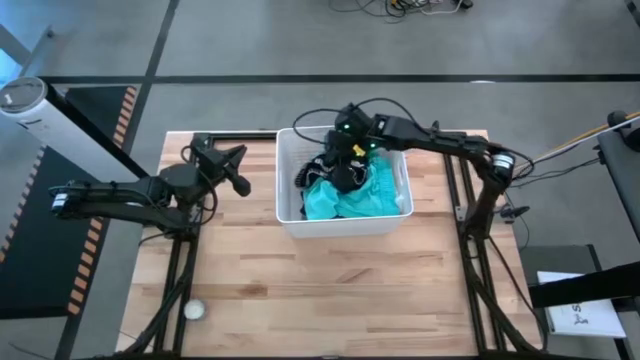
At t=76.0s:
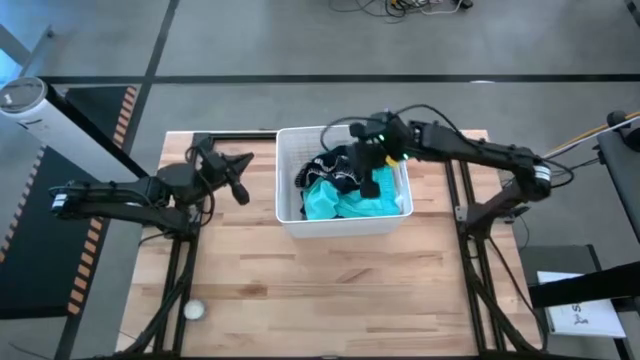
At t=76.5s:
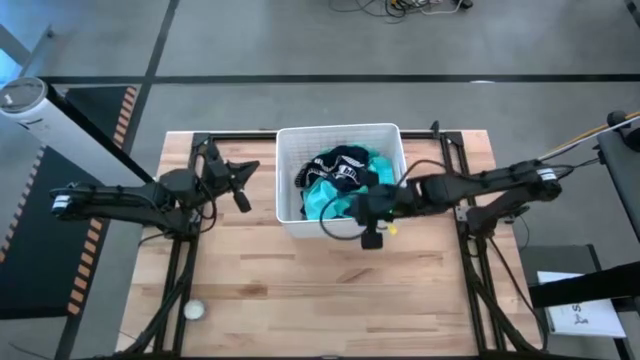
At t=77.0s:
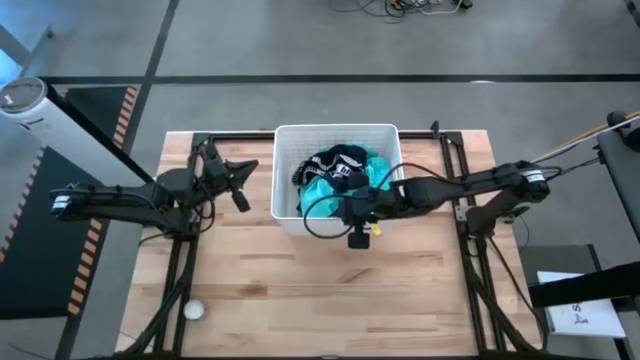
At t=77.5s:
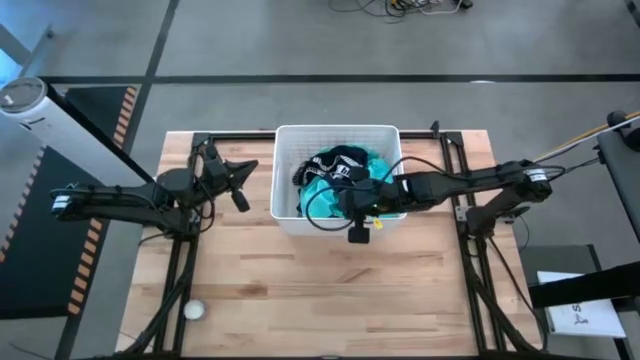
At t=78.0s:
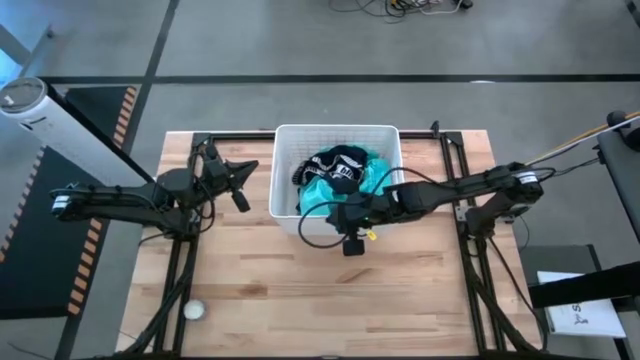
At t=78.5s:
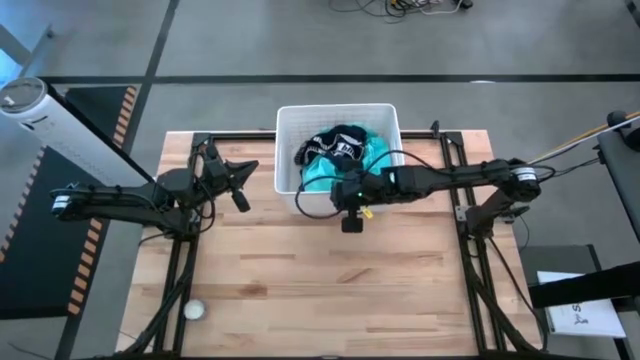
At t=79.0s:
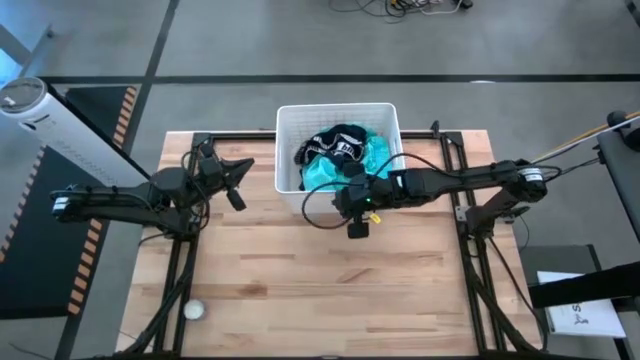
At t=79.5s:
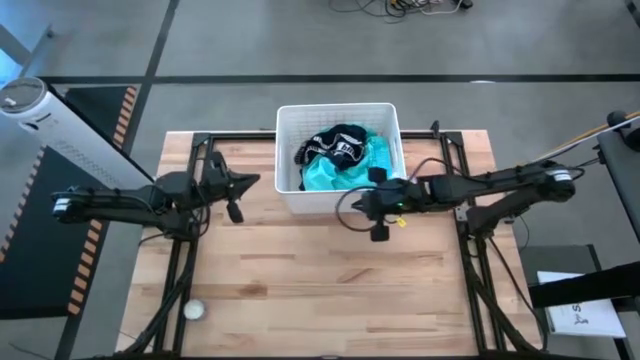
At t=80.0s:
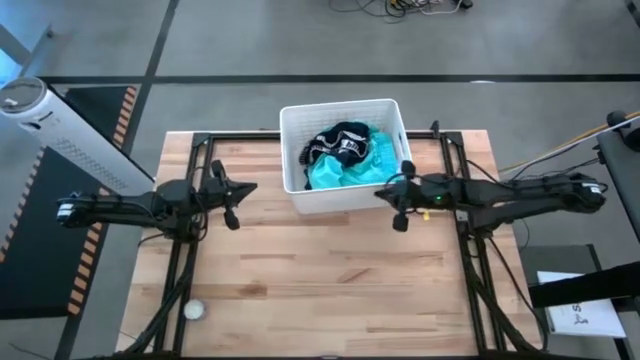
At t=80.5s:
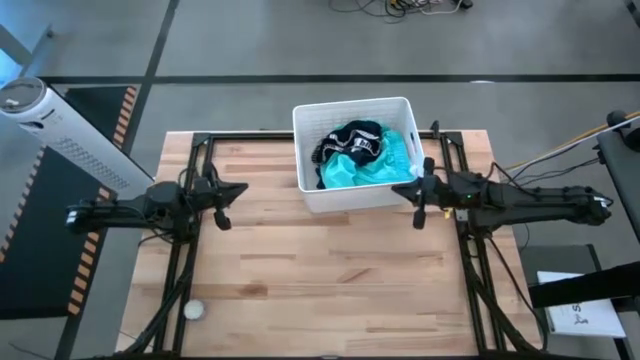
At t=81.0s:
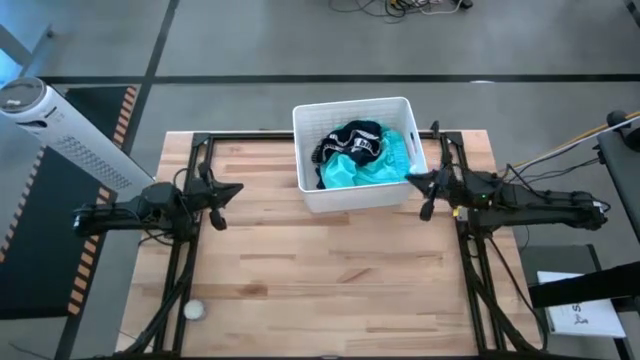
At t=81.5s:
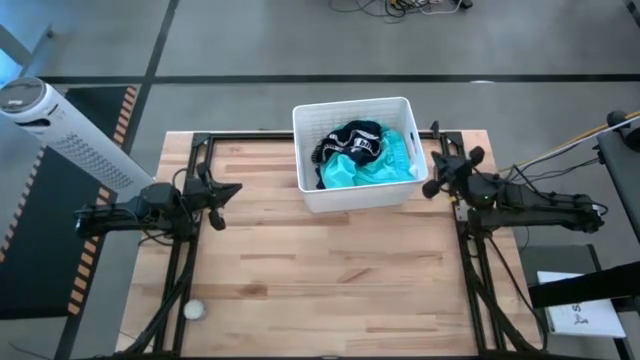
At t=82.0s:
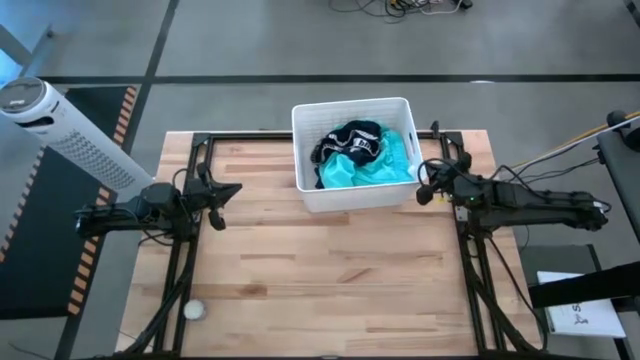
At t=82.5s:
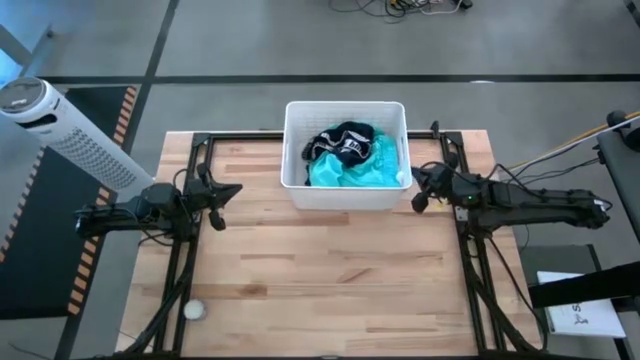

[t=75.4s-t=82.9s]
Task: Sort clothes
Move the white laundry bin to the top center of the table

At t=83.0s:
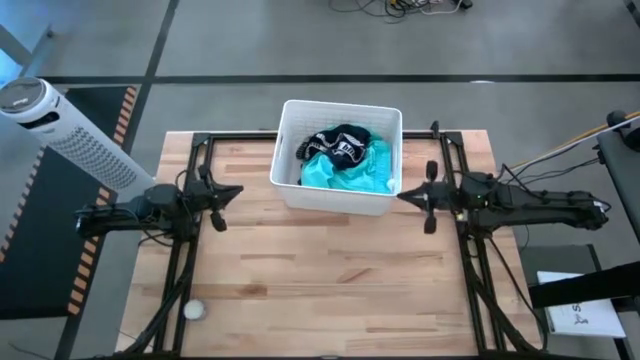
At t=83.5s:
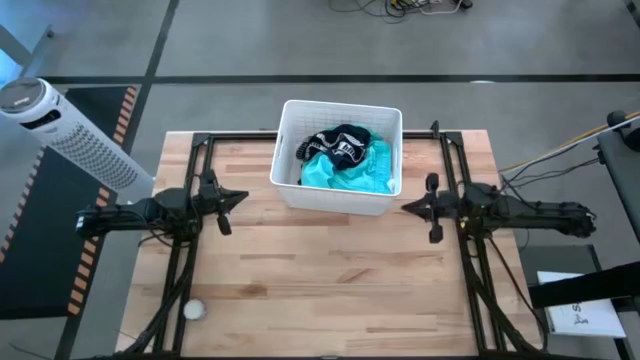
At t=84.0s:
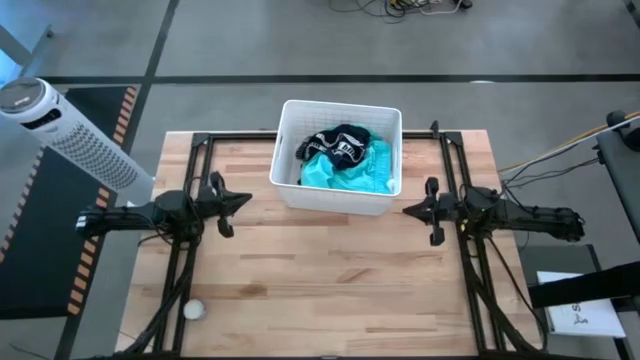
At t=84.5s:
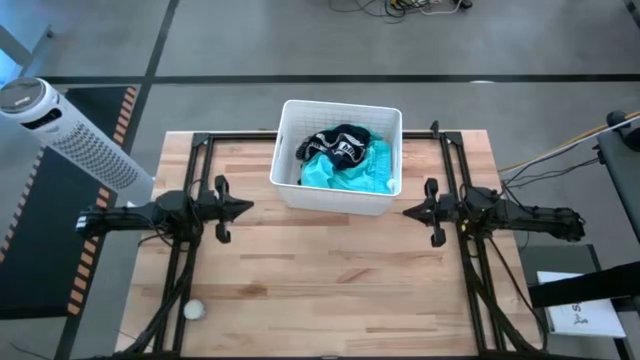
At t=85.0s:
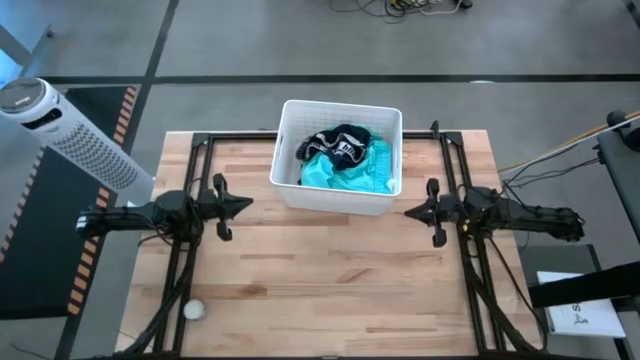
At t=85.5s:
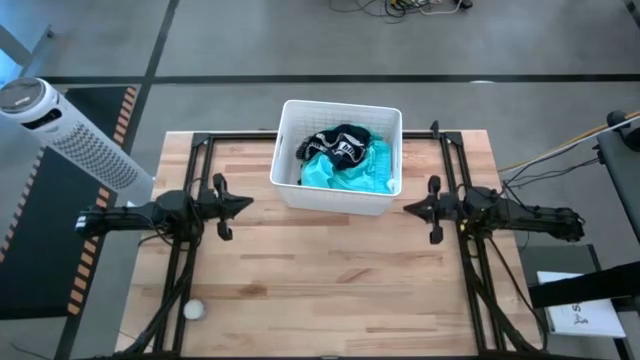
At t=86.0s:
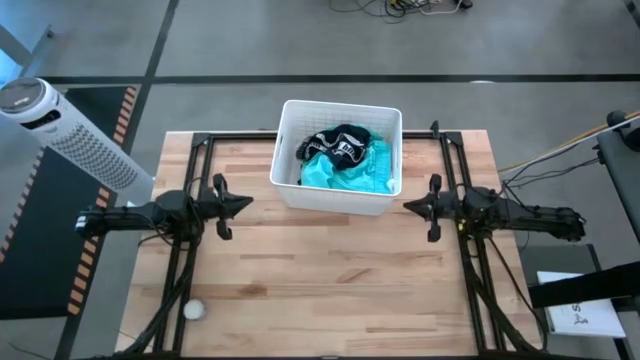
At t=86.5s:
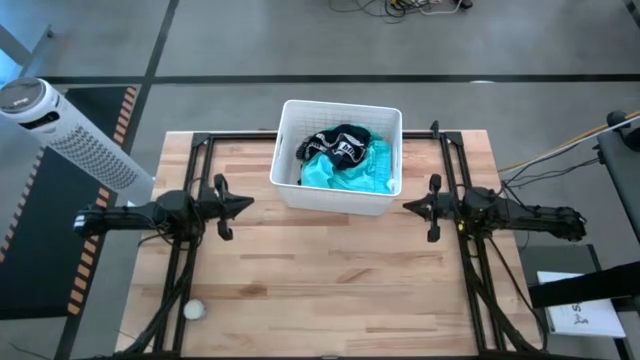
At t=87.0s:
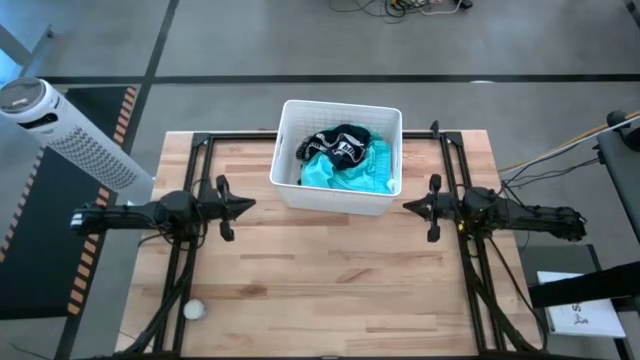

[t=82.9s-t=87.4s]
Return to Home Position

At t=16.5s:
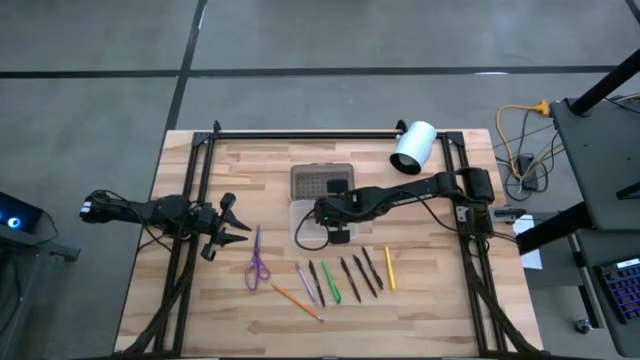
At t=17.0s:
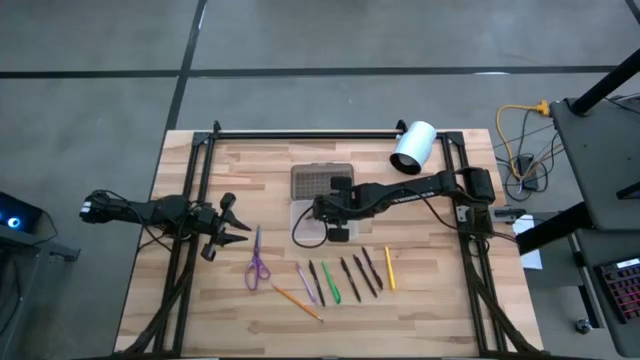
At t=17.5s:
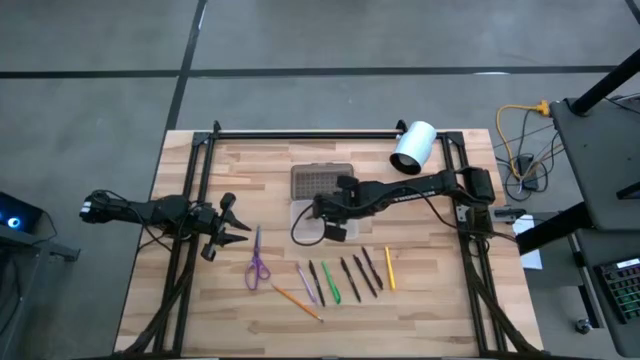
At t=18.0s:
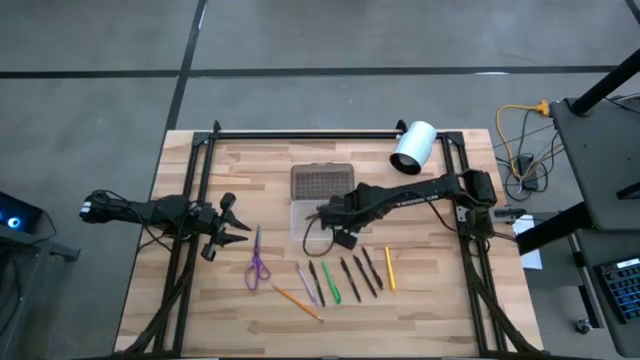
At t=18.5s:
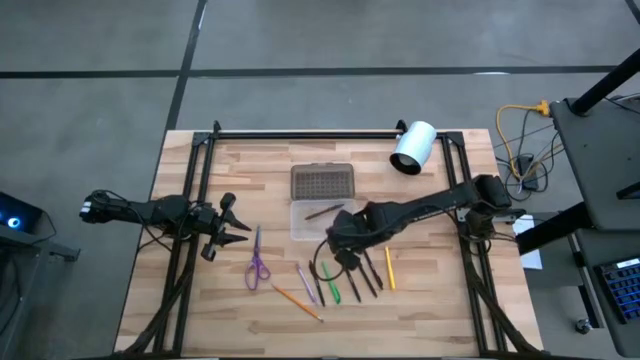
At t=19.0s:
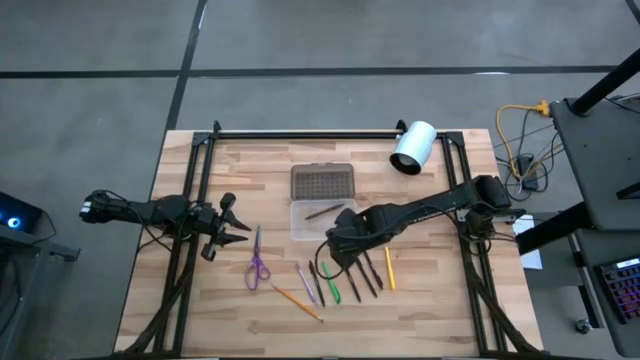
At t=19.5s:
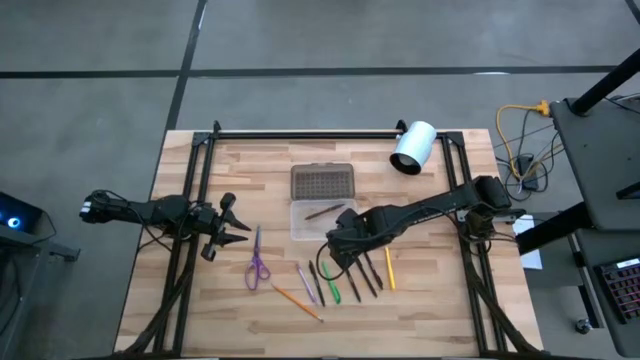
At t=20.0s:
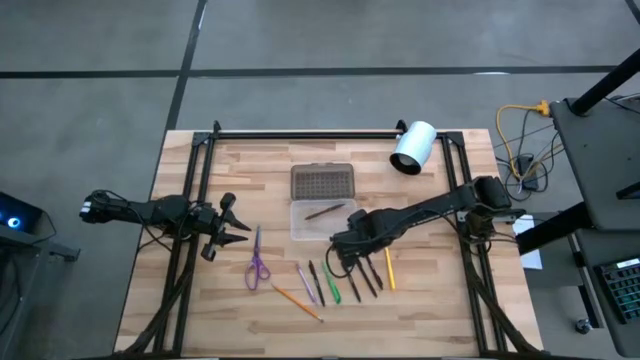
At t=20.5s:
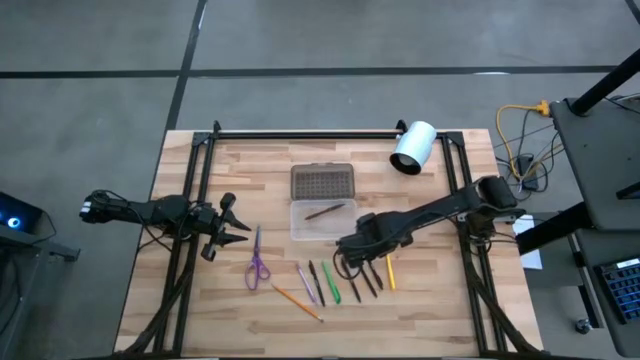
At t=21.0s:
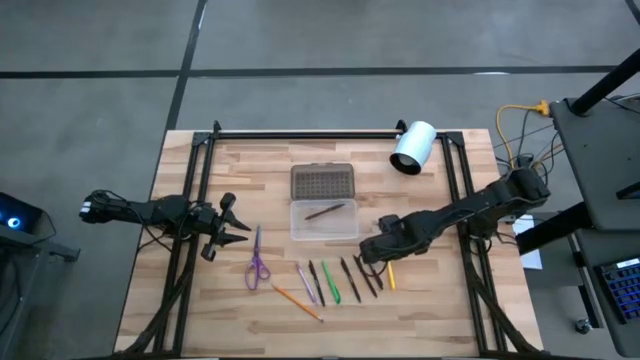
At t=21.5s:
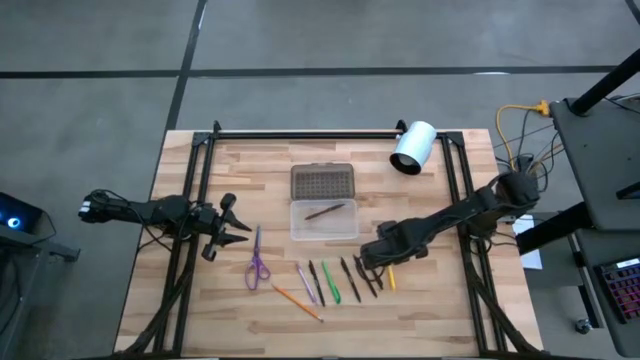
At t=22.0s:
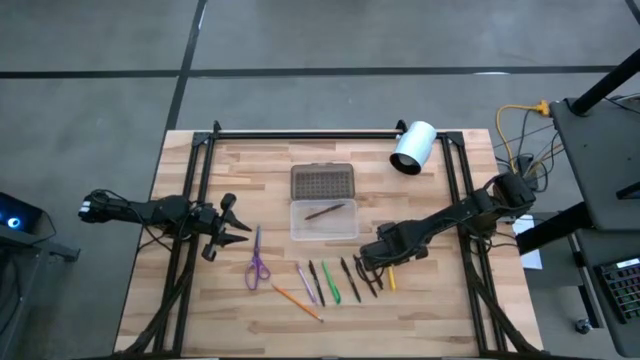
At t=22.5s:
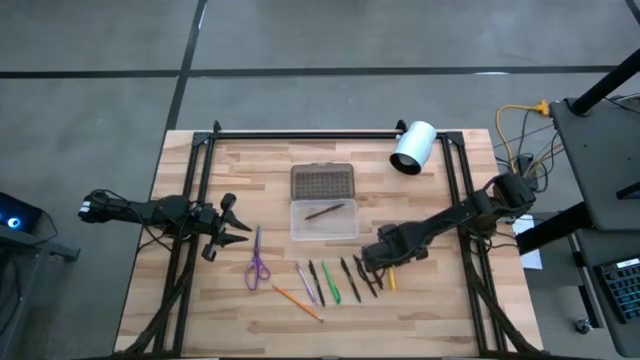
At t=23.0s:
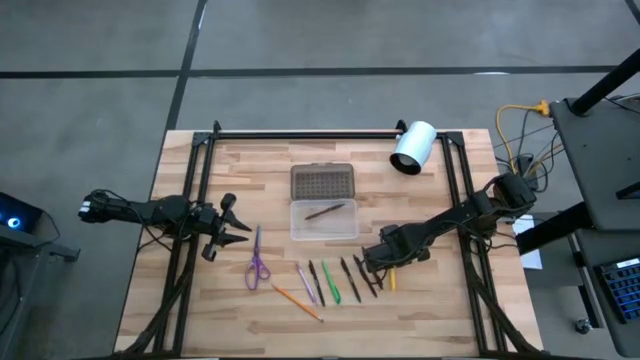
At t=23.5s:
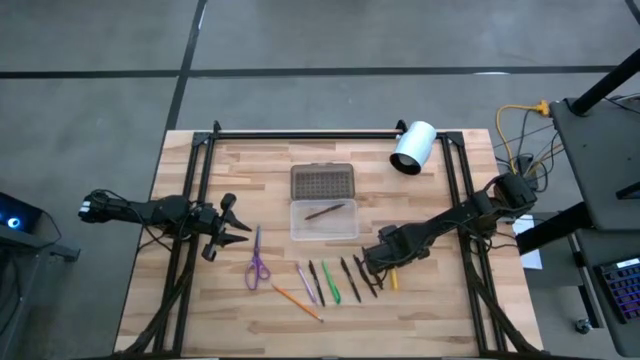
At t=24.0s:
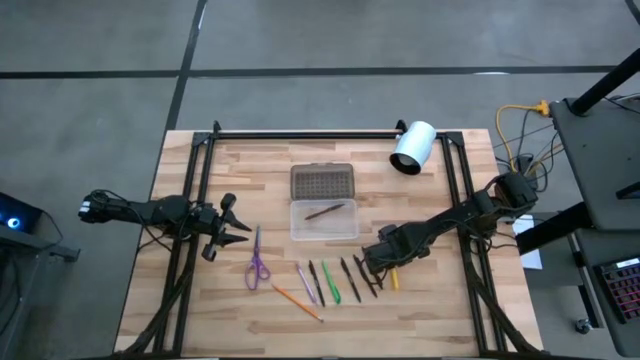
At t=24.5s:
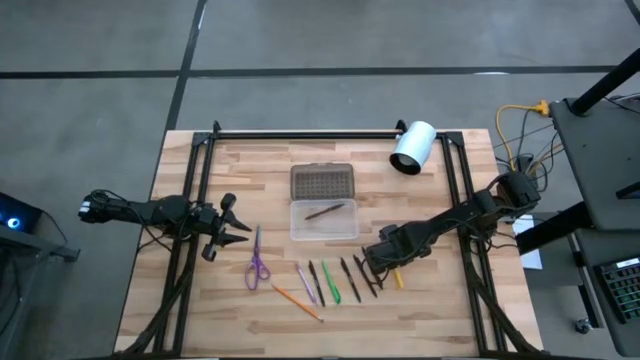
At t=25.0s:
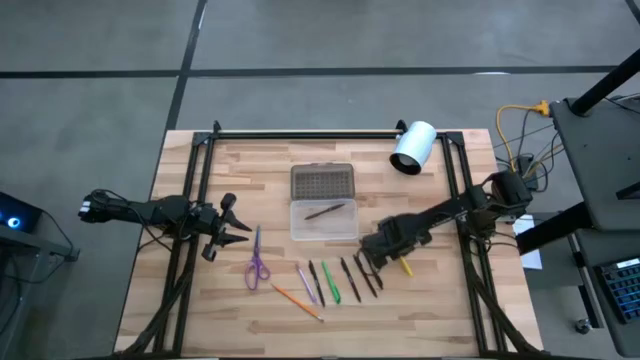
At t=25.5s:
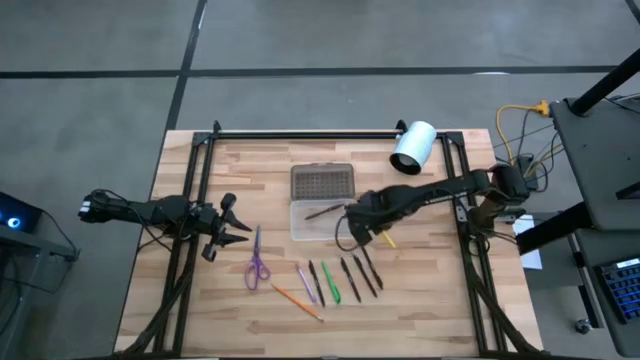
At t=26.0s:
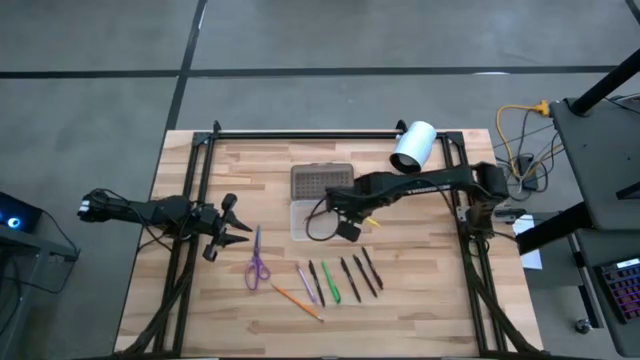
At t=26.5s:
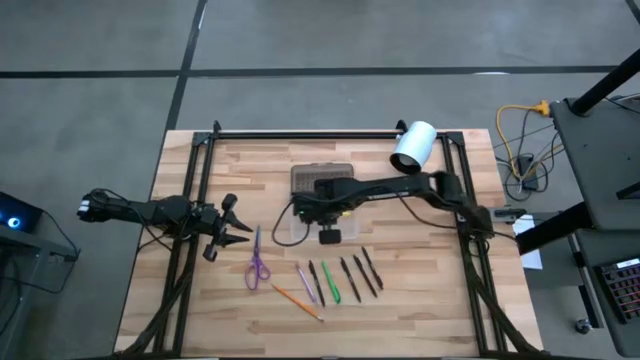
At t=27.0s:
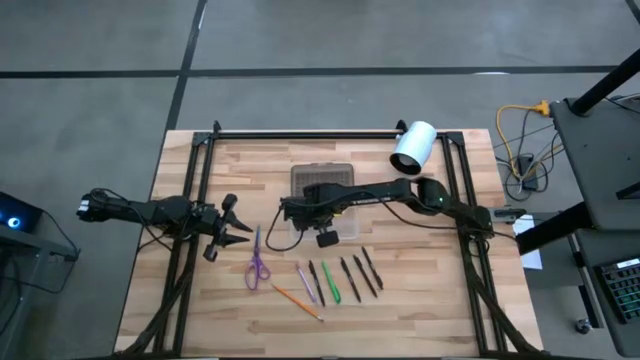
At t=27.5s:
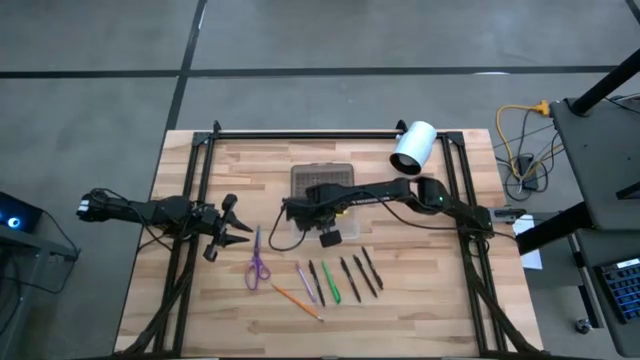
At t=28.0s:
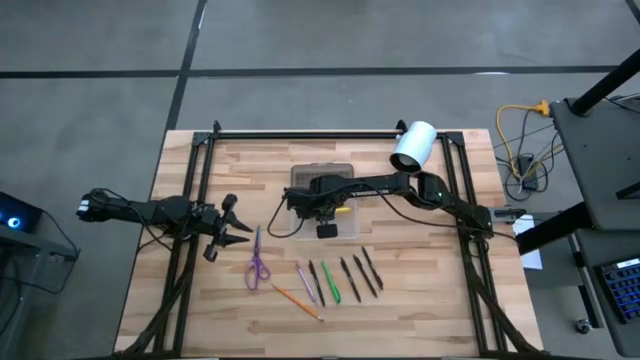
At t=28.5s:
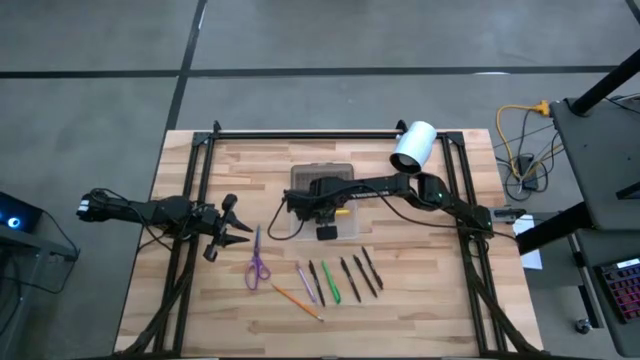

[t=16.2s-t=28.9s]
Task: Pick & place school supplies into a supply box
Put the yellow pen into the supply box
